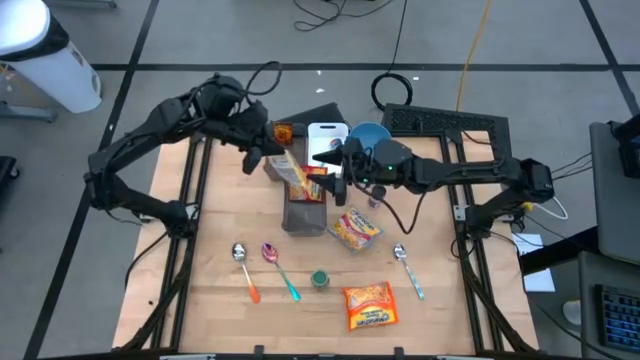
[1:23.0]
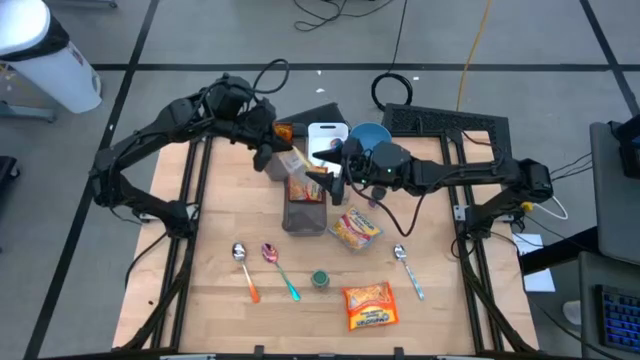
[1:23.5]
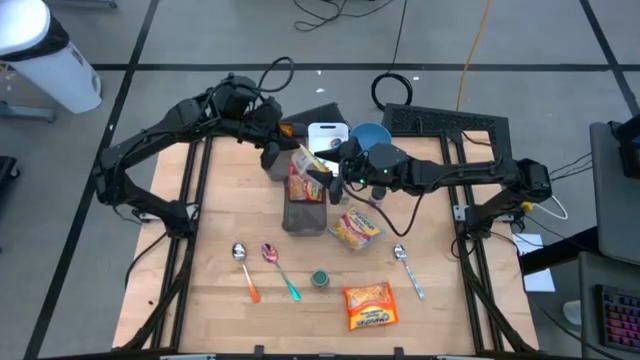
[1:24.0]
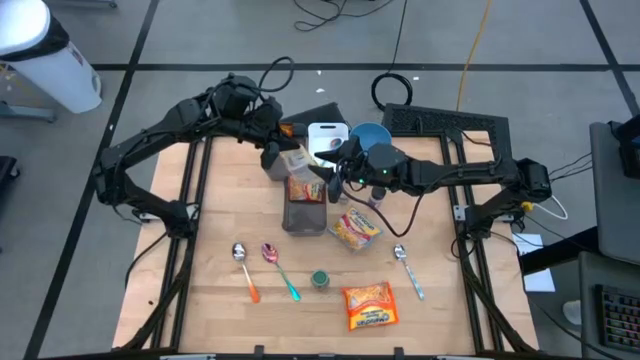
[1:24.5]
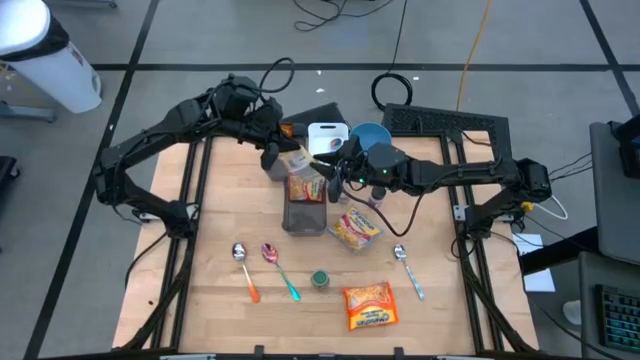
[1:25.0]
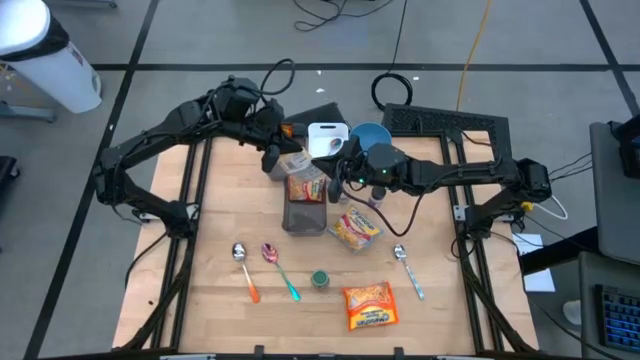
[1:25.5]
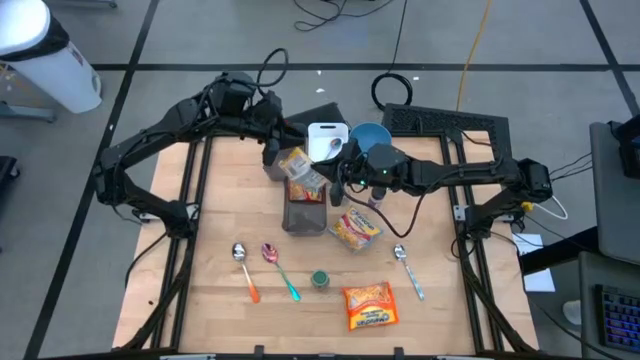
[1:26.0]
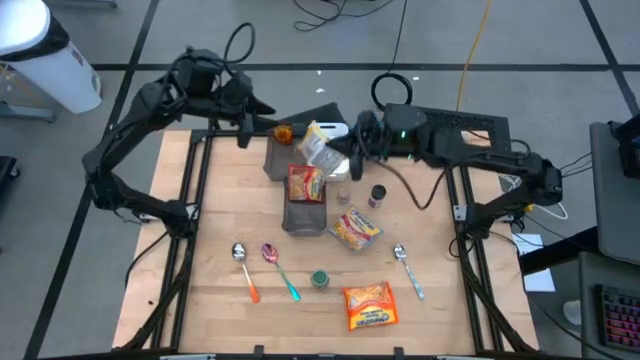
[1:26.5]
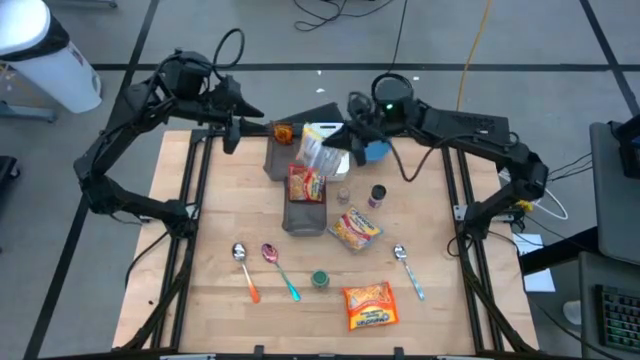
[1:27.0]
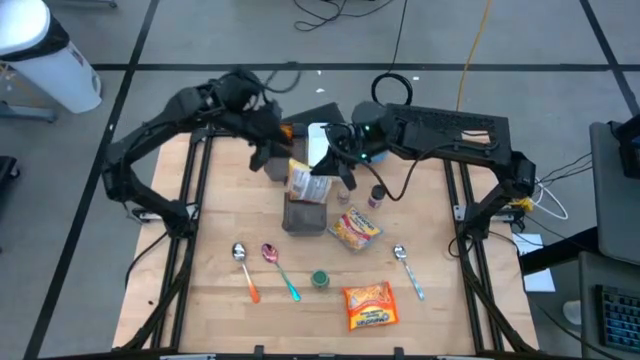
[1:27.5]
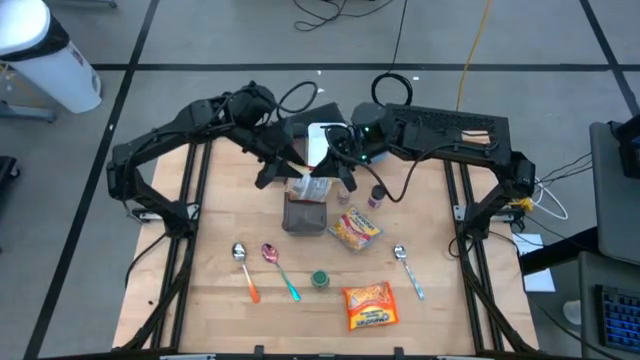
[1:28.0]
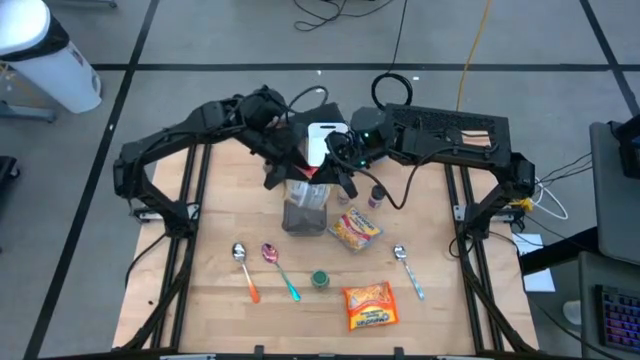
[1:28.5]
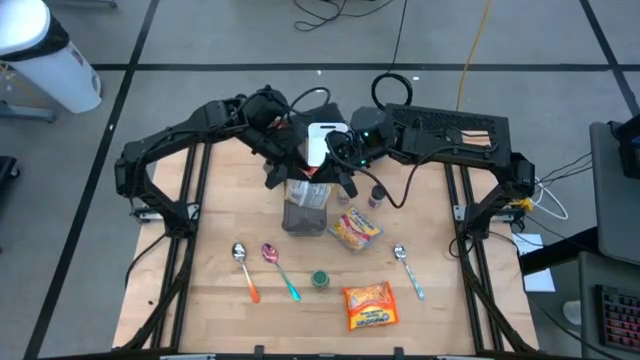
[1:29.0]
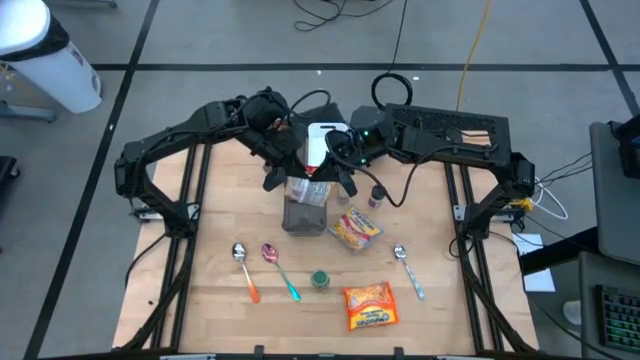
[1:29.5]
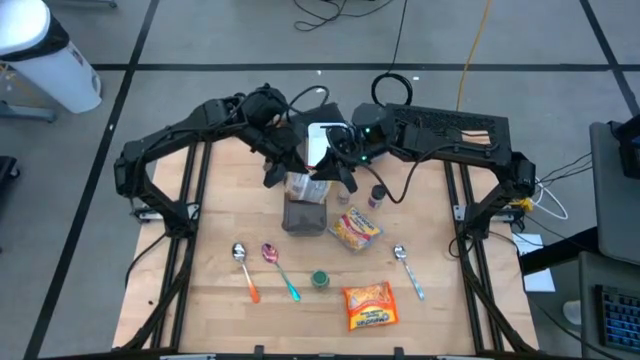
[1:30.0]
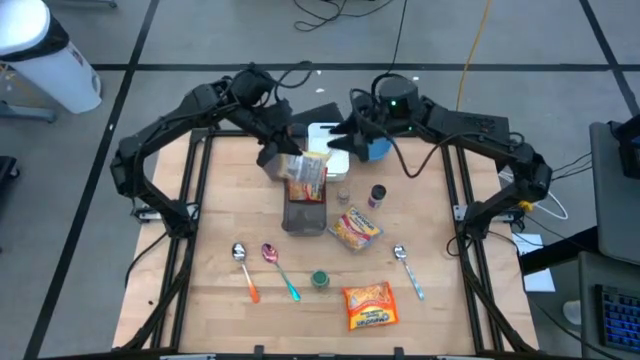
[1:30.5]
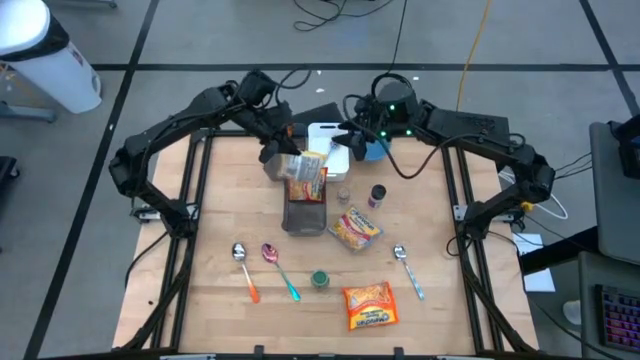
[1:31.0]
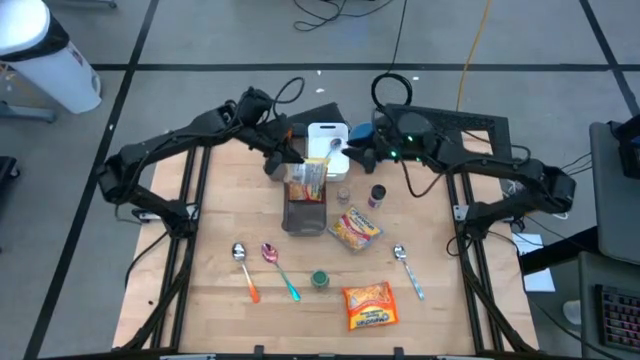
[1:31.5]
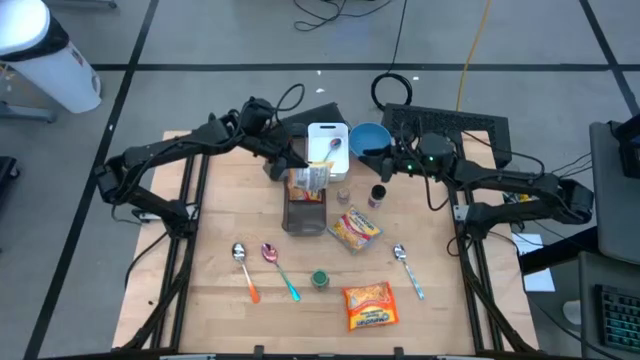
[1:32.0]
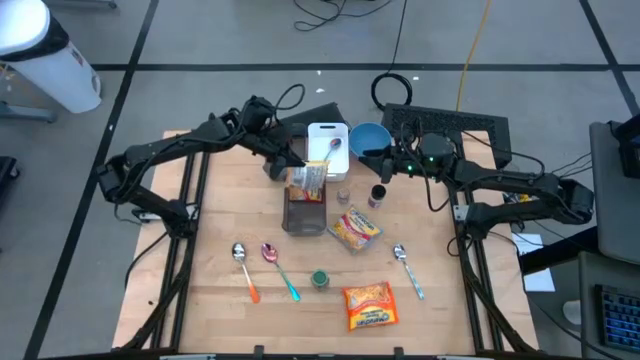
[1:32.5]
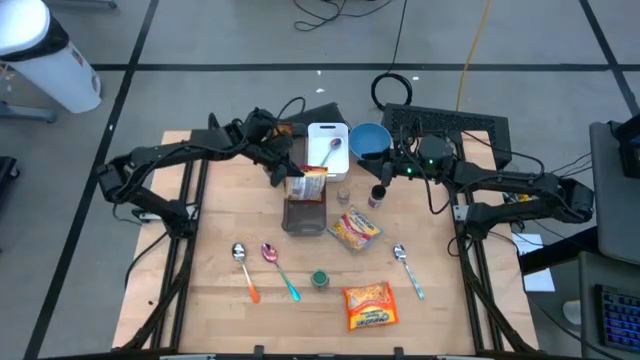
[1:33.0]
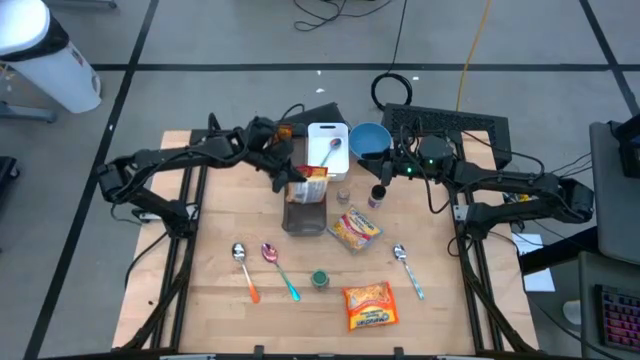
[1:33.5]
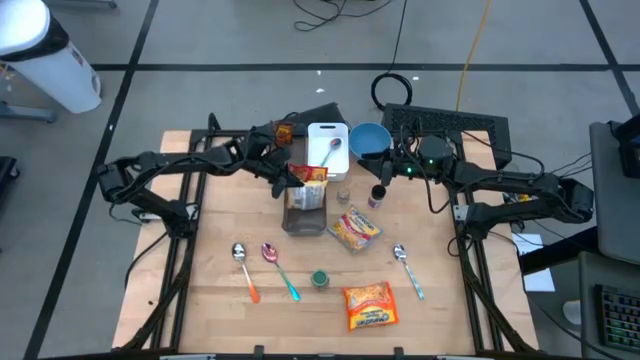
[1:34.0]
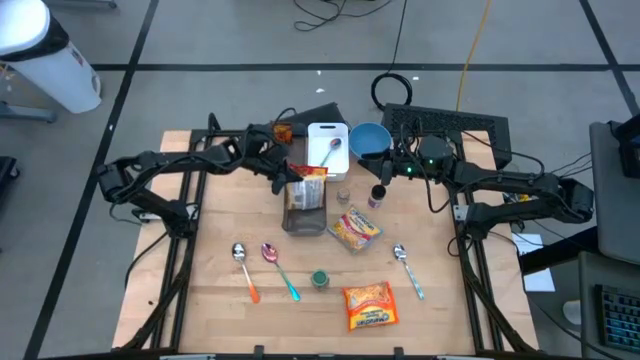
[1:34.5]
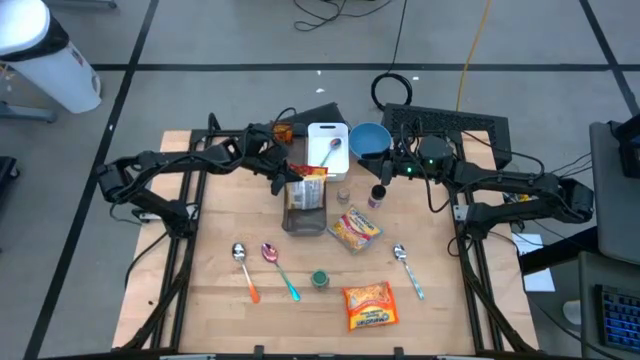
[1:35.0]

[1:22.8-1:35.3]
Task: Pick & Place Food Item
Put the yellow noodle pack into the bottom black bin

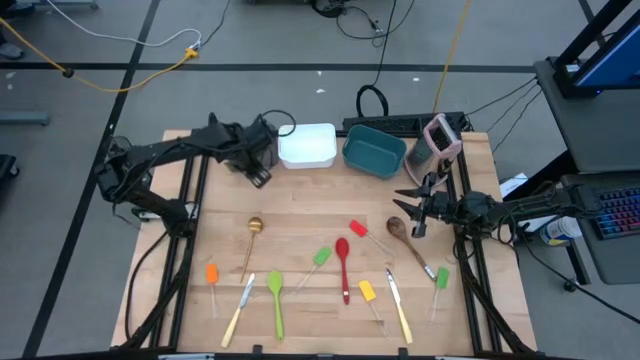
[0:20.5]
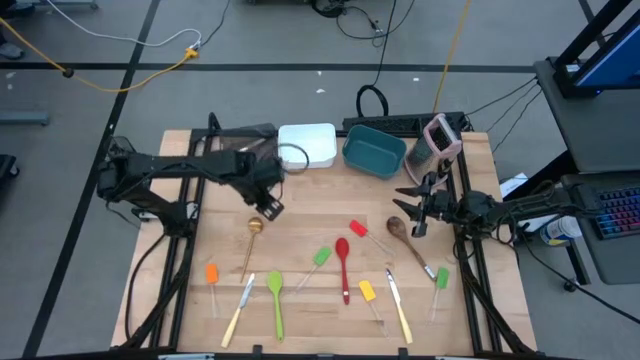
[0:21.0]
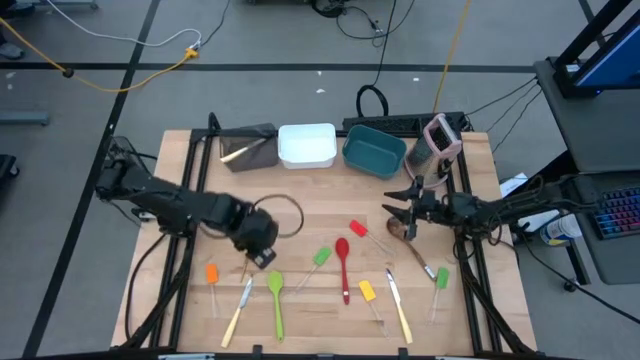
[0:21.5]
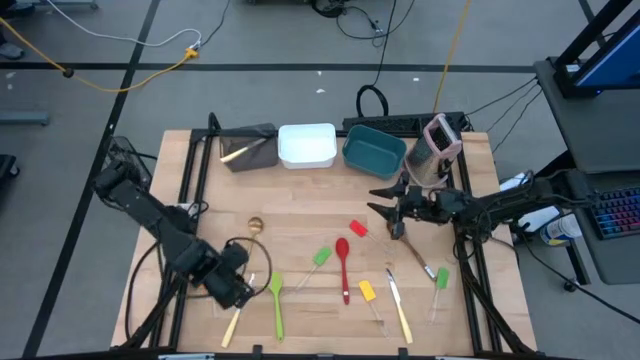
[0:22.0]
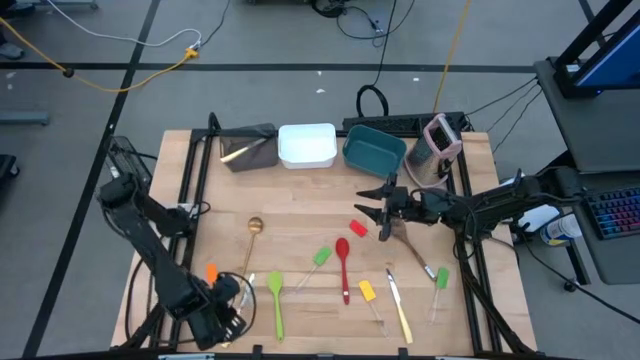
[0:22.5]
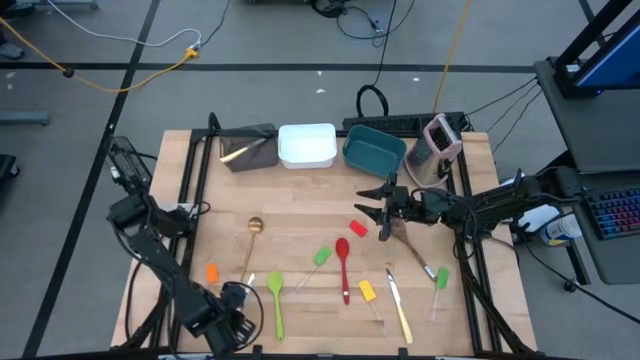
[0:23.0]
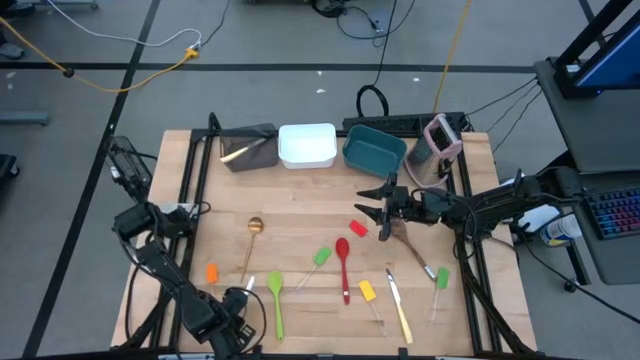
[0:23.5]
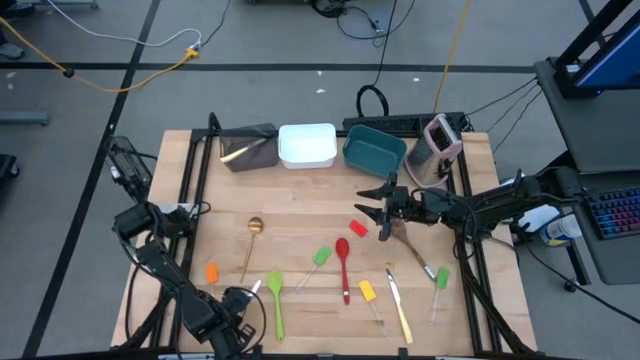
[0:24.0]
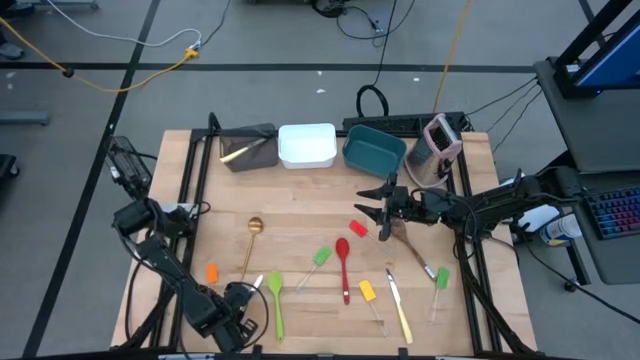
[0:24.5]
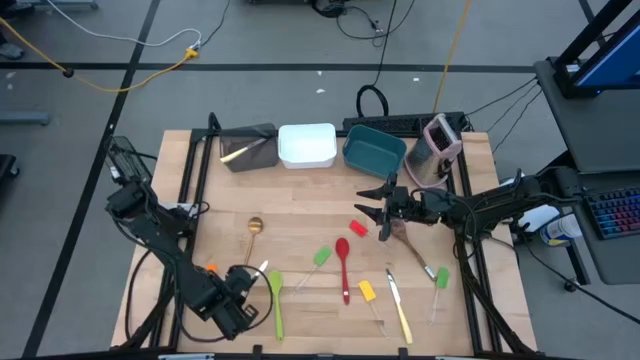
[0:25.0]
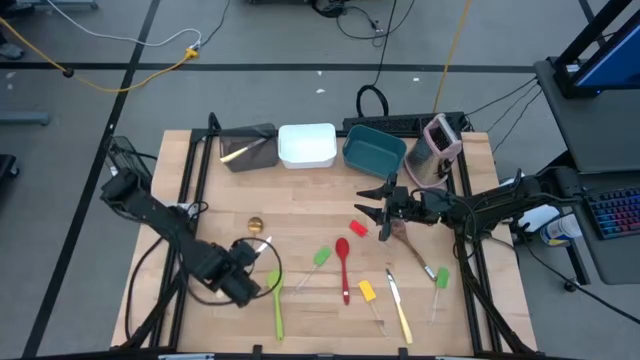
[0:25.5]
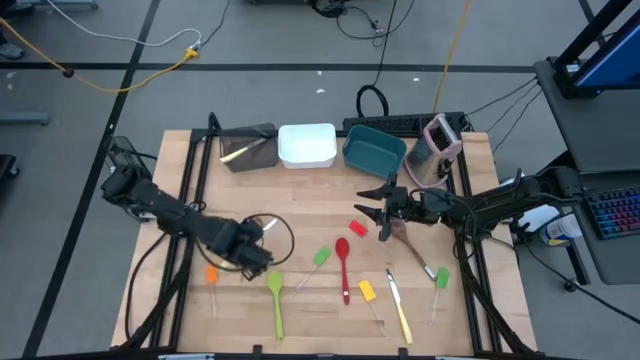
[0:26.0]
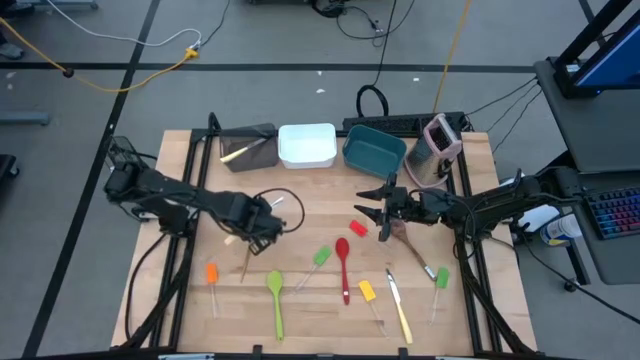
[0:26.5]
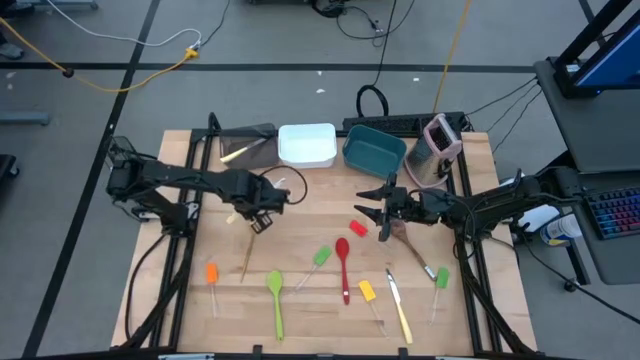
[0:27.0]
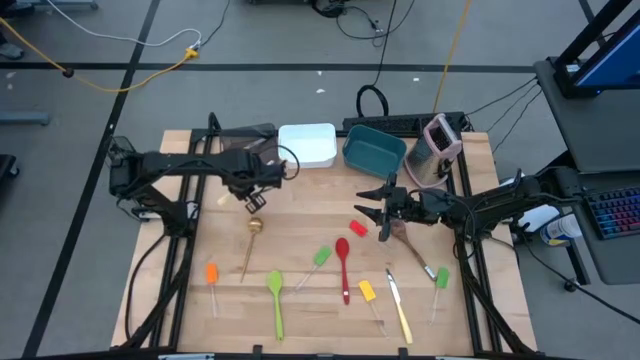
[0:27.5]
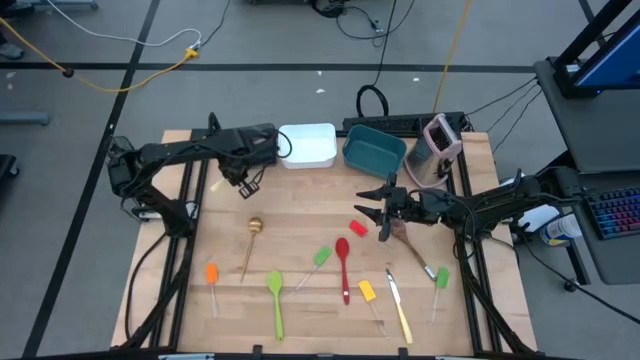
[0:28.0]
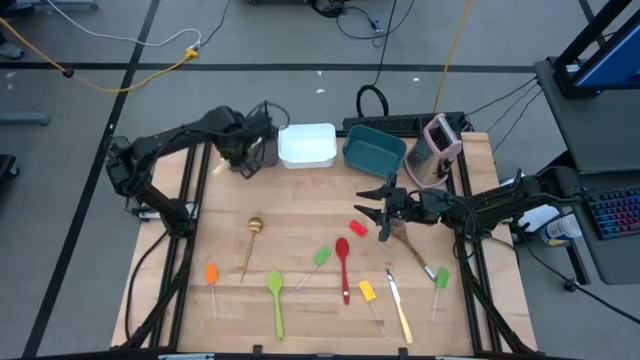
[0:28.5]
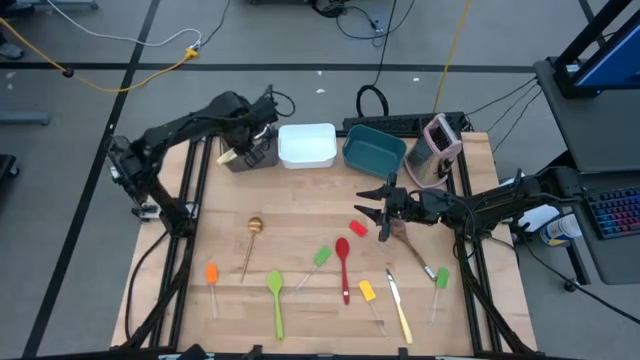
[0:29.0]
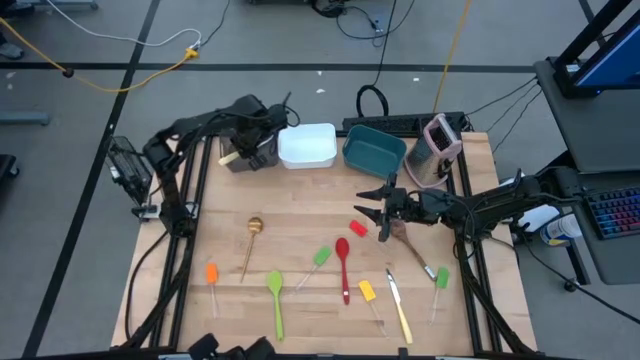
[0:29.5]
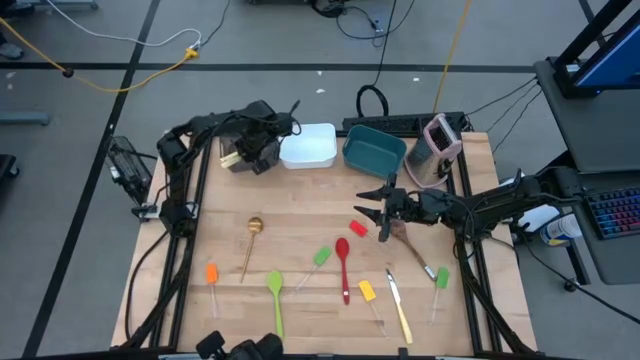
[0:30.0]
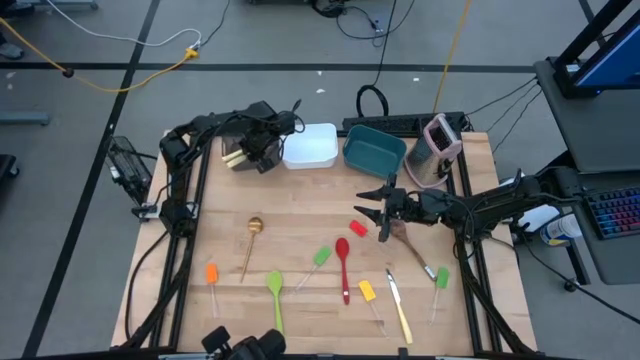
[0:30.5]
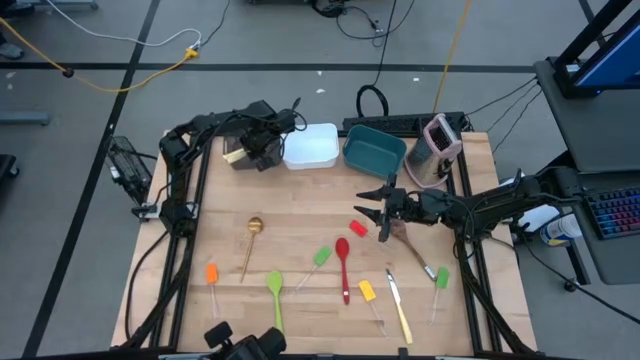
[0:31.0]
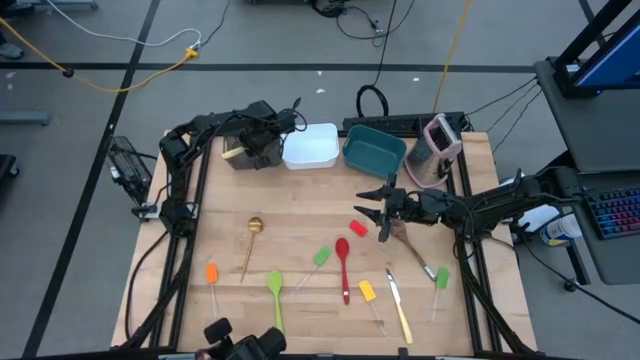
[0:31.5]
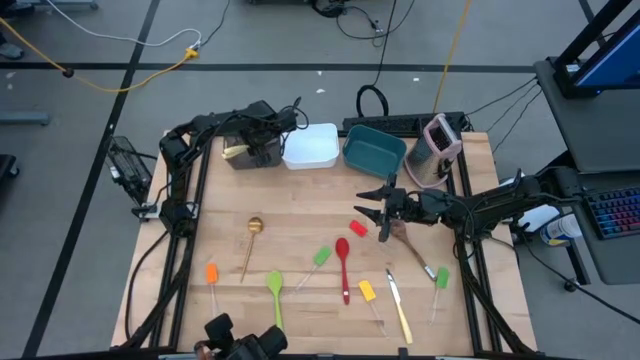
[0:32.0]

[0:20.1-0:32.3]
Task: Pick & Place Kitchen Items
Put the left yellow table knife into the black bin
